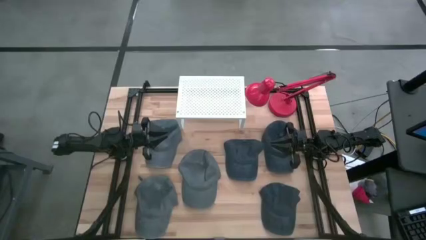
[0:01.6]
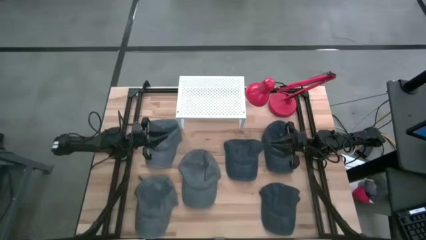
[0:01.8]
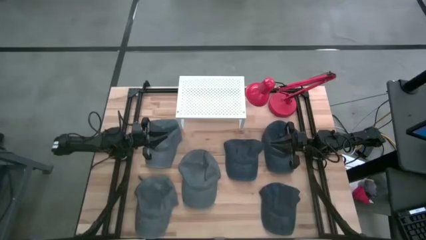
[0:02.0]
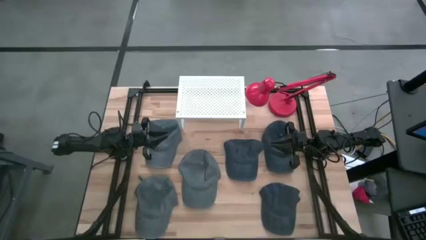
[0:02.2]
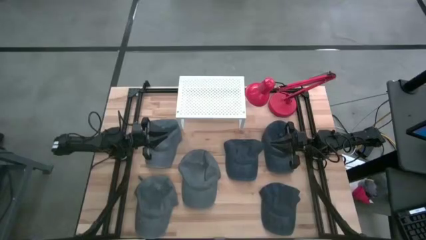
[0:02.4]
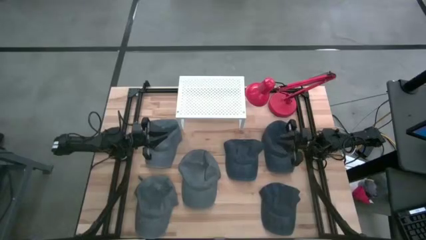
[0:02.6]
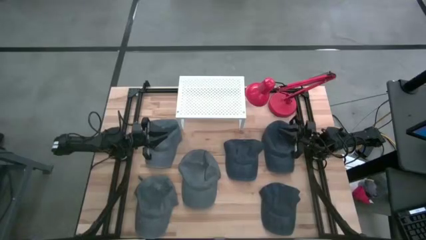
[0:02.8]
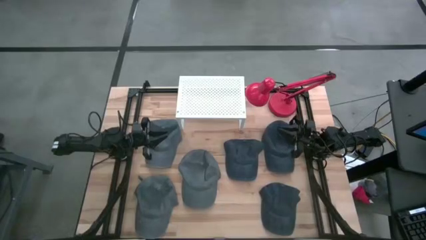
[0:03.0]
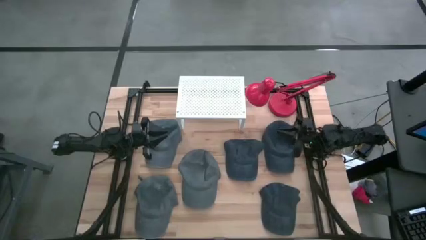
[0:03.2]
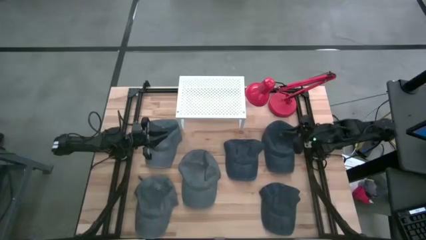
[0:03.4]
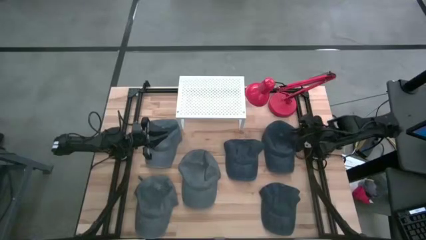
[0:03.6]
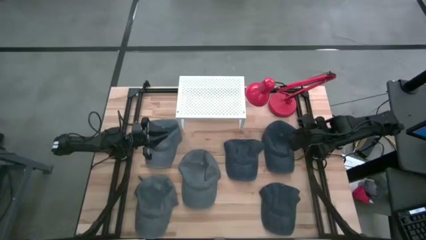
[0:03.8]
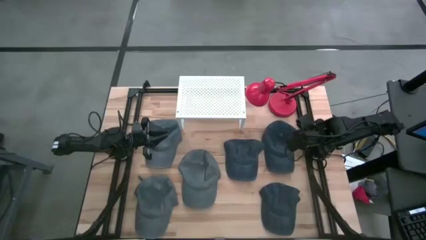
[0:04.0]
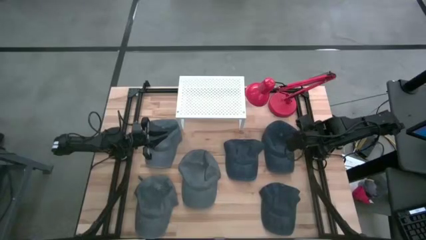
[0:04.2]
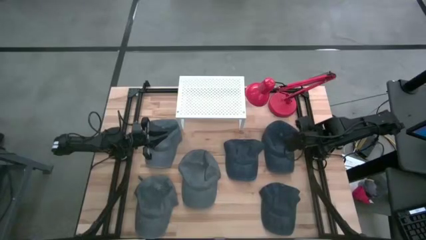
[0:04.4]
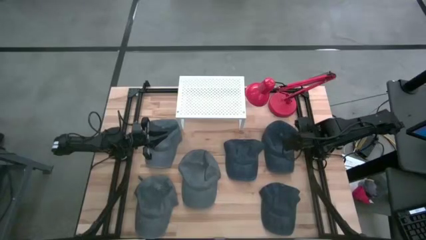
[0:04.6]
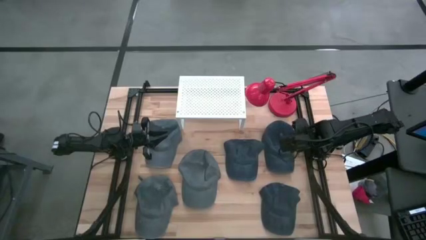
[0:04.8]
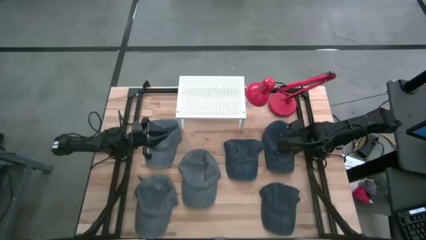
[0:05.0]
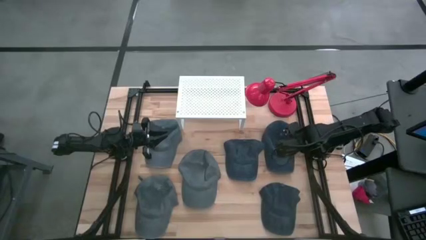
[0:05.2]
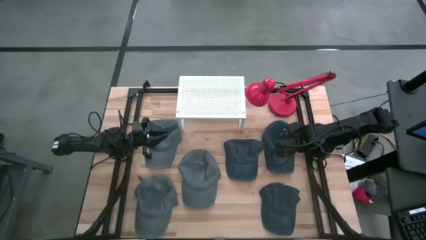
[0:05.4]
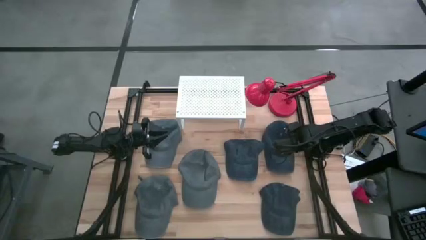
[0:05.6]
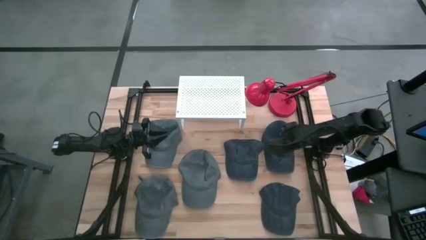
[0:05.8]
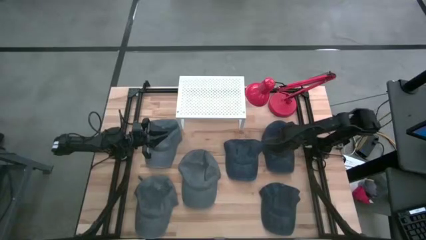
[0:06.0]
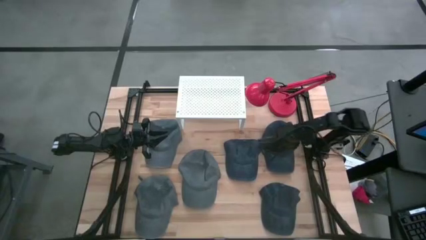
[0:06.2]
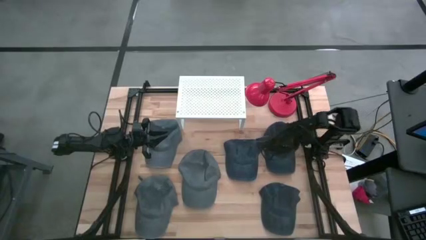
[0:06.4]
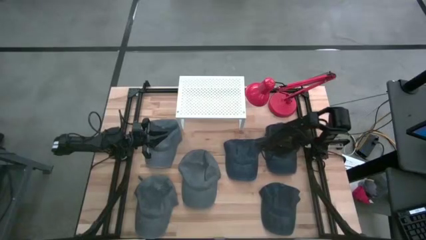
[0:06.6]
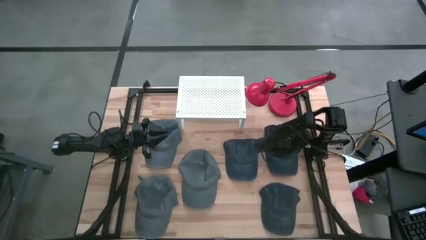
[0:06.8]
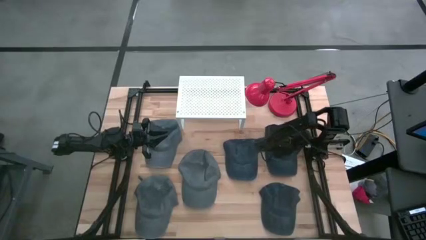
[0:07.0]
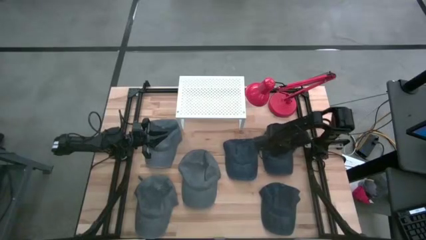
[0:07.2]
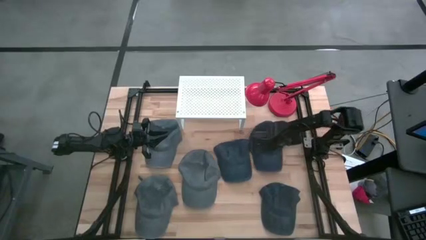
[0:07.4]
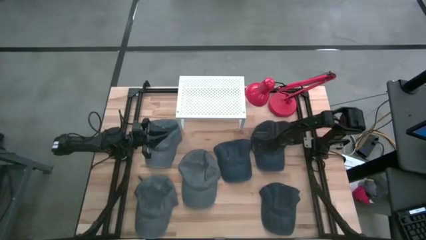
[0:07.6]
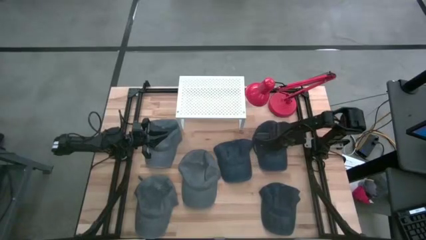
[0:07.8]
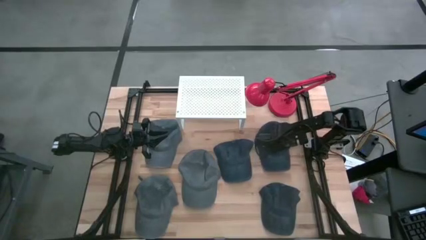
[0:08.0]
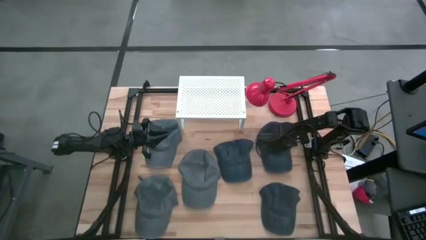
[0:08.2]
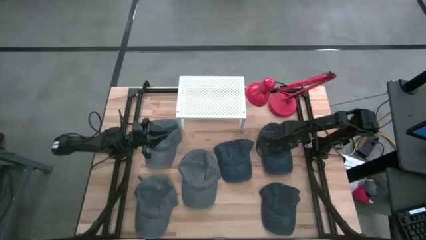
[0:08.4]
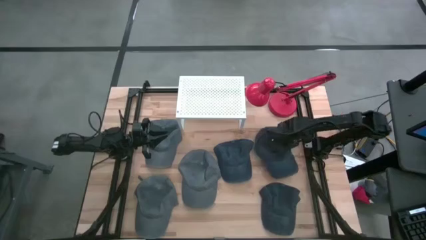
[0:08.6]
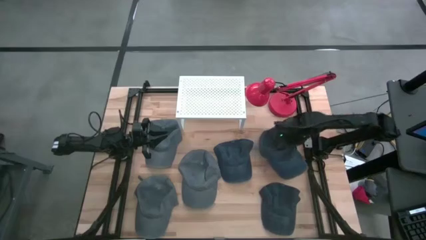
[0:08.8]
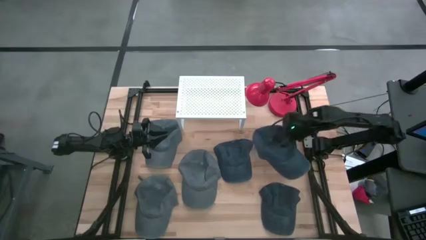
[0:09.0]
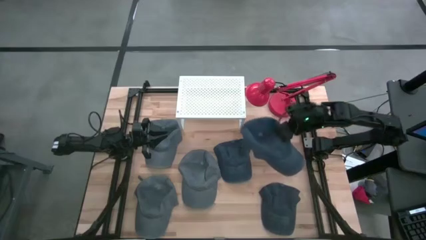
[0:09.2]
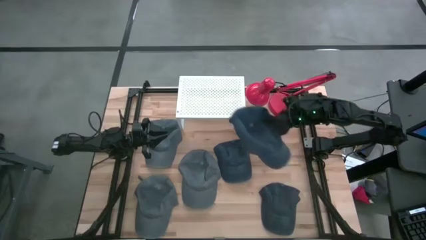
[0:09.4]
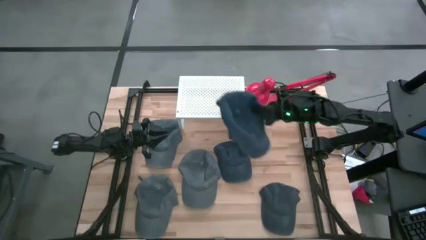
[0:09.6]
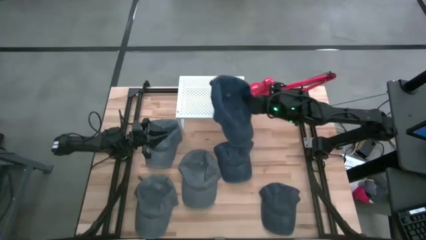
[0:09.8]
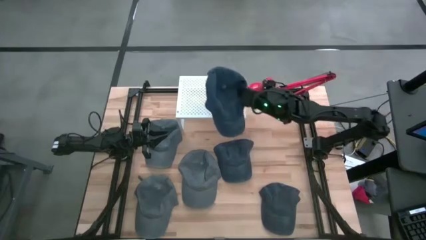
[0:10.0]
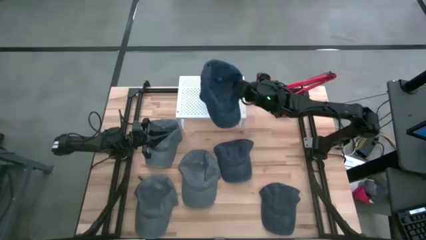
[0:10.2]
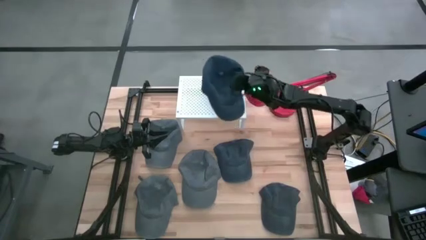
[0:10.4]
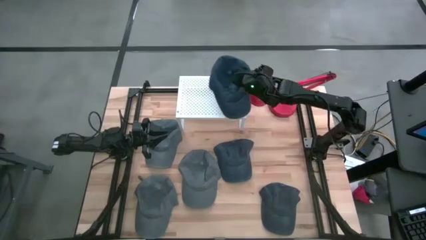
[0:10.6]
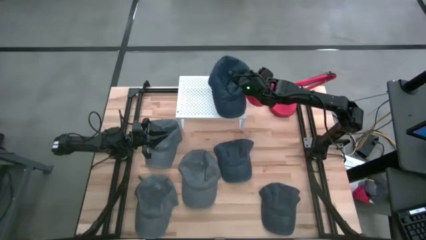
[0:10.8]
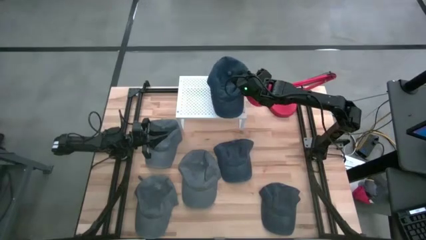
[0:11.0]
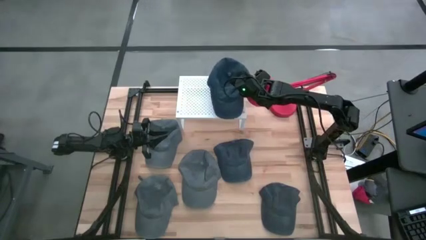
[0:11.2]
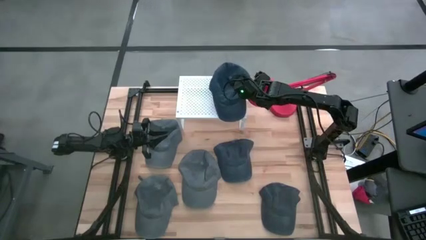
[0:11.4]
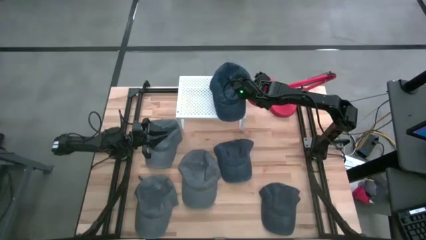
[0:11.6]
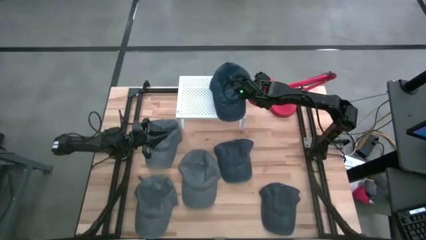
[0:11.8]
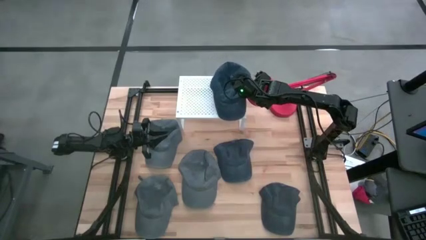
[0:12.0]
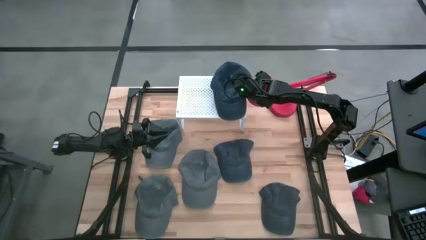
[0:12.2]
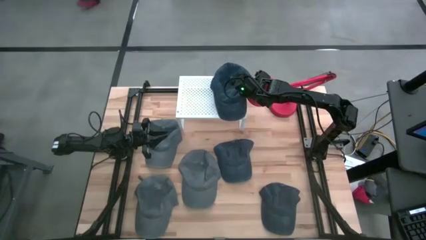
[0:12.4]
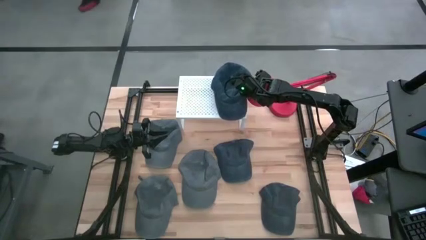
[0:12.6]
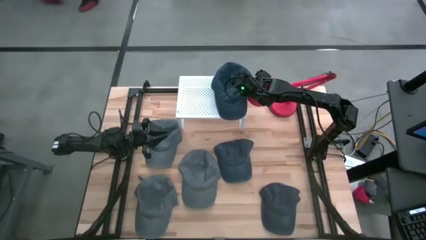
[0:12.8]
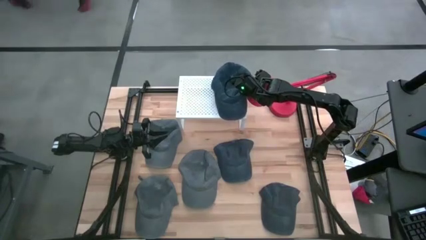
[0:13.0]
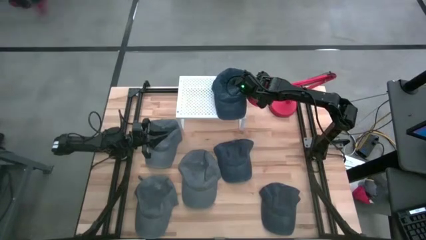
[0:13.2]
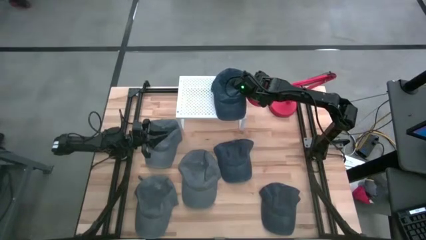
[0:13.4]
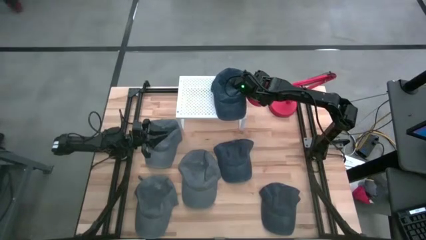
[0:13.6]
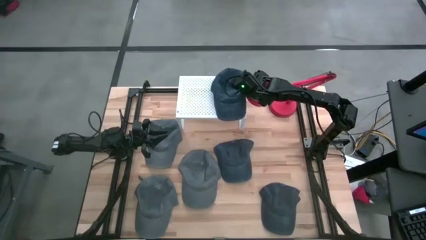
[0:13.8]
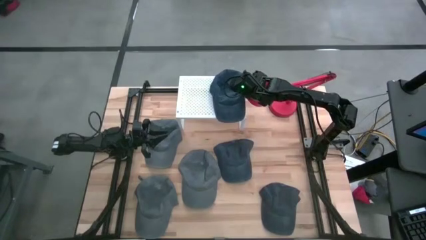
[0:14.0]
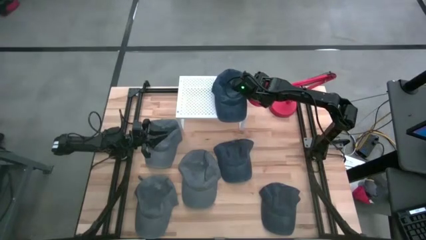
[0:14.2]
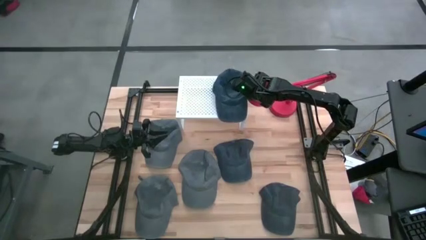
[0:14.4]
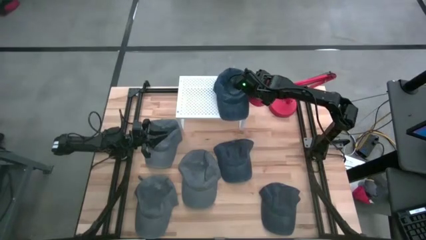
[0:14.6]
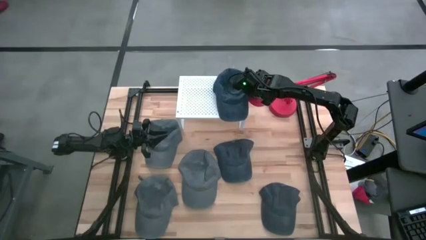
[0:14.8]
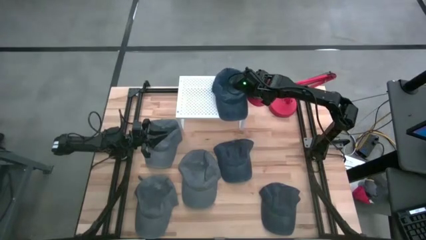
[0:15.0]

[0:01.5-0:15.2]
Task: Pick & Place hat
Put the top right black cap on the shelf

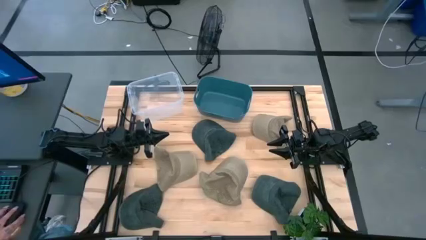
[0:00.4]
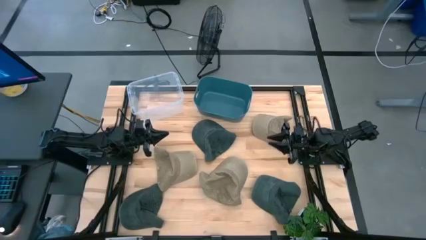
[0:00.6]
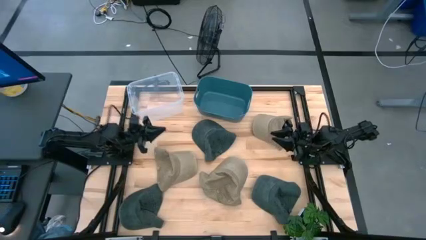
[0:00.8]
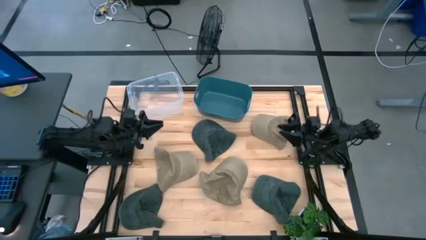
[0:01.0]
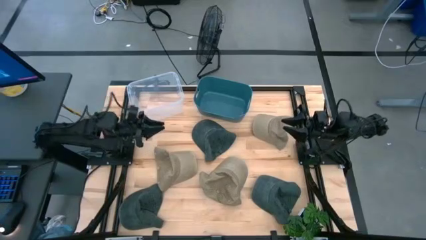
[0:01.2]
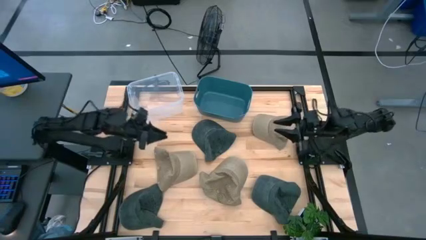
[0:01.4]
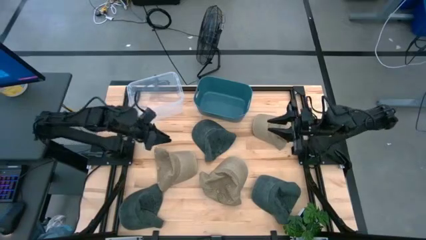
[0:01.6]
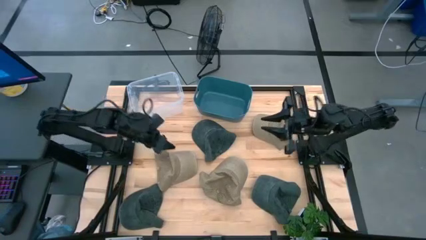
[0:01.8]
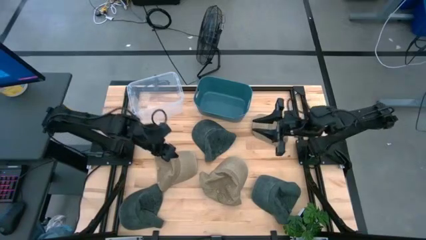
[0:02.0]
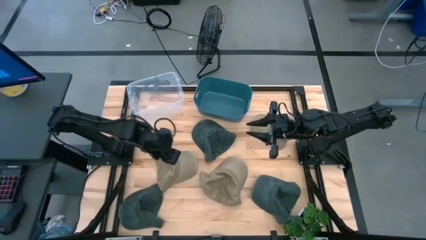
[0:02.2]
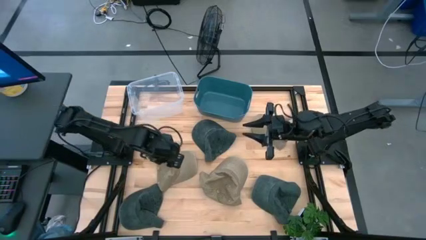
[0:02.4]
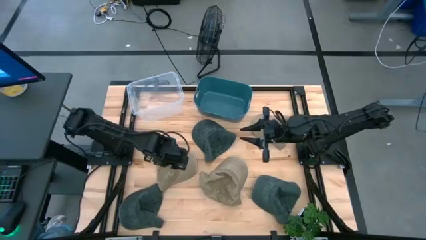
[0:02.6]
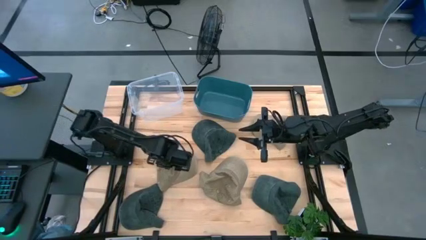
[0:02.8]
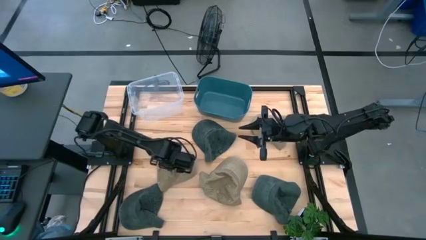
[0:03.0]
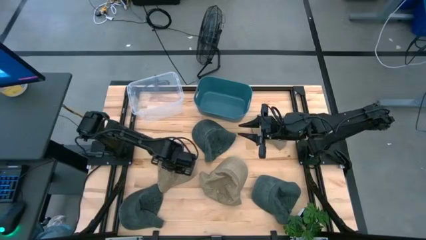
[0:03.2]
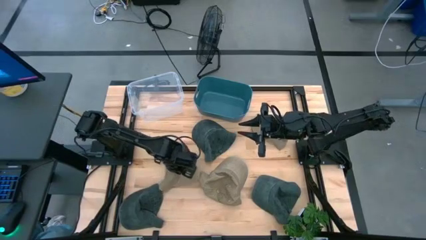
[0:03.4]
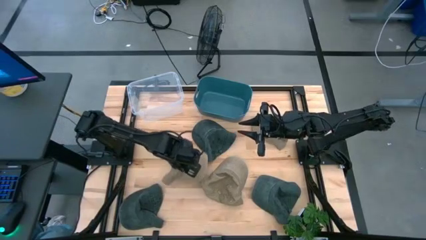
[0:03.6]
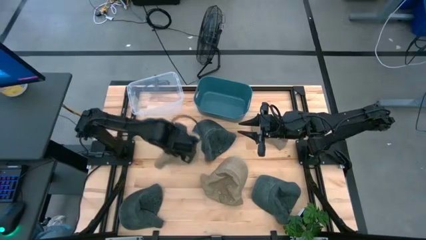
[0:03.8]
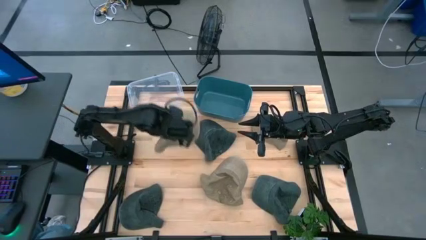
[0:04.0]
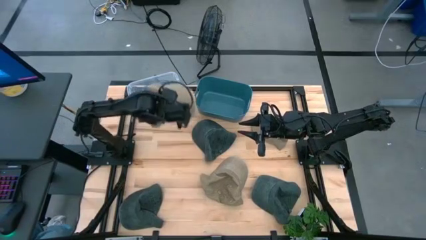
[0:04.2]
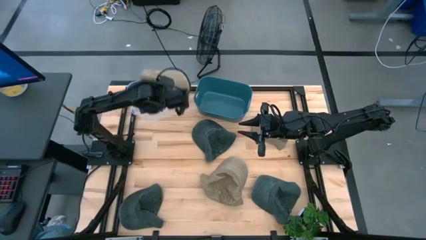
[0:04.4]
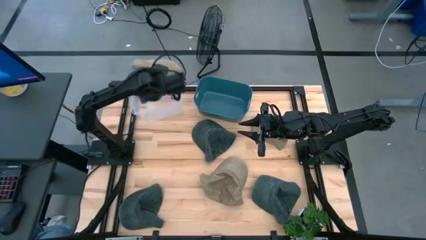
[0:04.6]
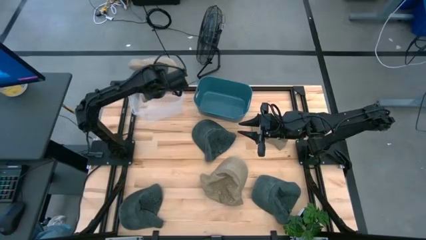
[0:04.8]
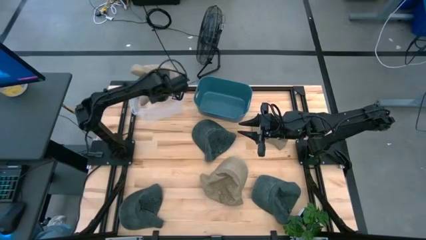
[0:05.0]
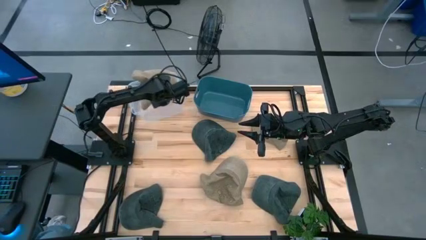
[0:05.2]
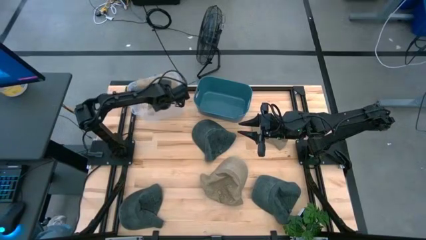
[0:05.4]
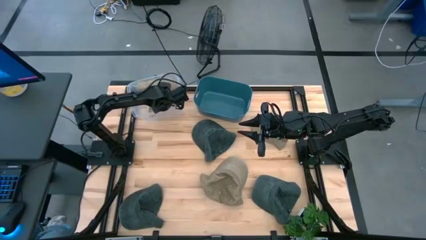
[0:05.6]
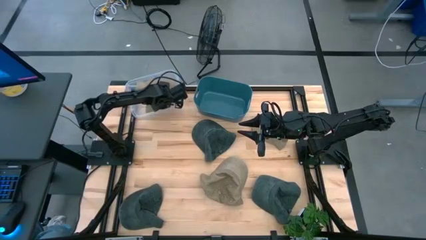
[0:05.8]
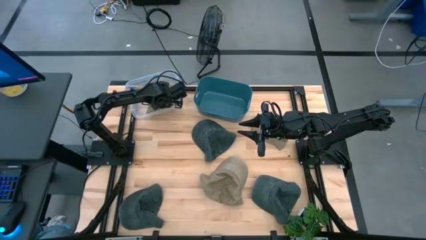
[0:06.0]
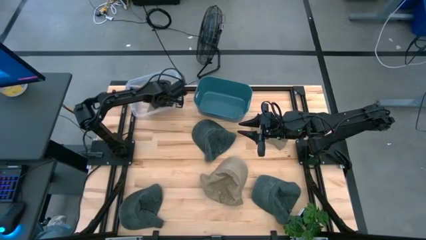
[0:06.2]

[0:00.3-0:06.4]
Task: Pick & Place hat
Put the bottom left brown cap into the transparent bin
